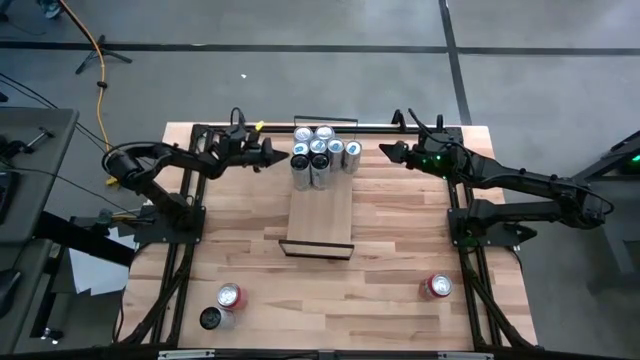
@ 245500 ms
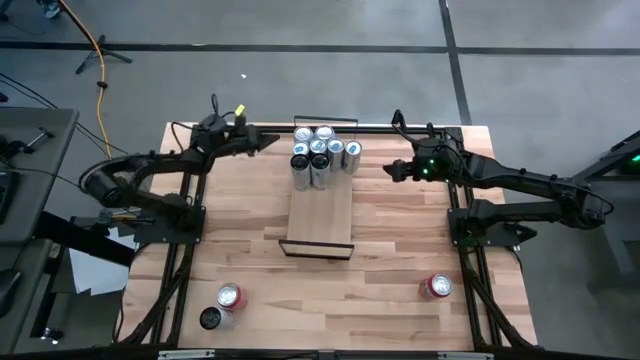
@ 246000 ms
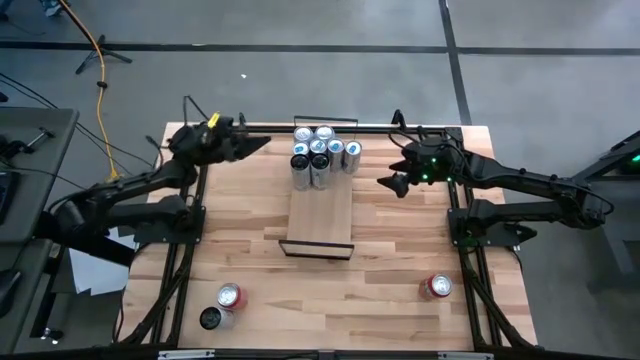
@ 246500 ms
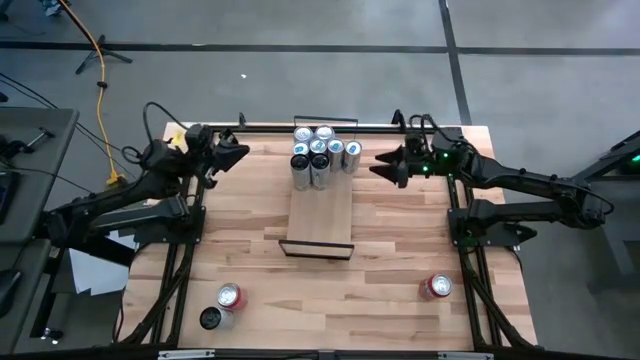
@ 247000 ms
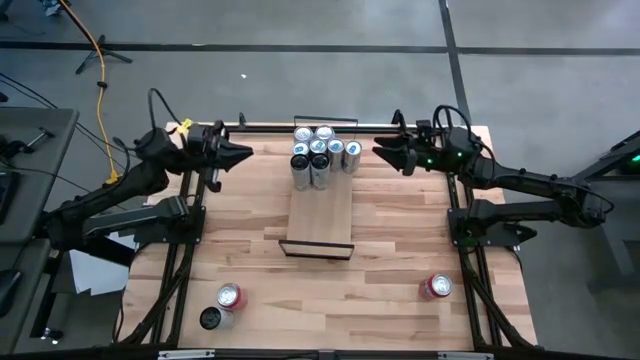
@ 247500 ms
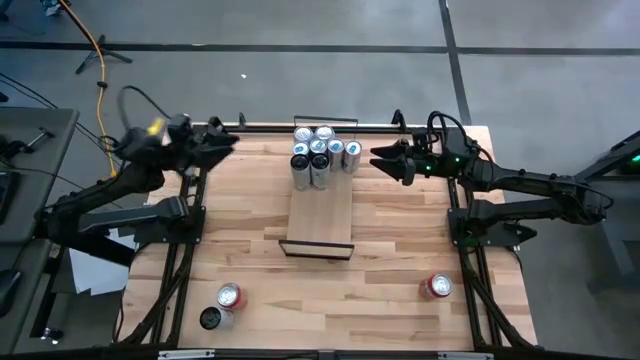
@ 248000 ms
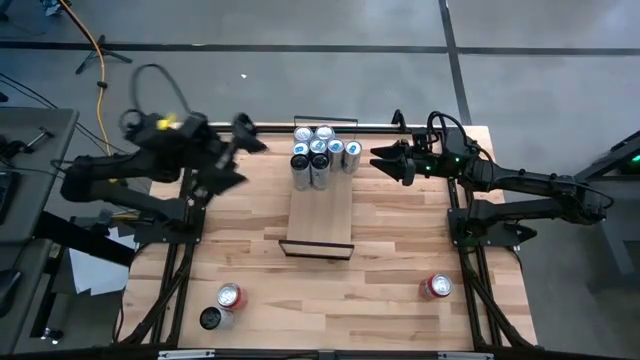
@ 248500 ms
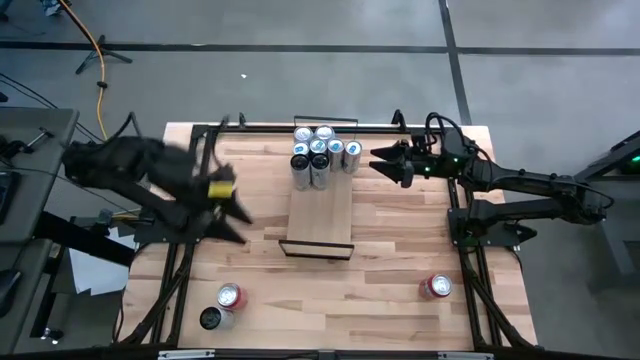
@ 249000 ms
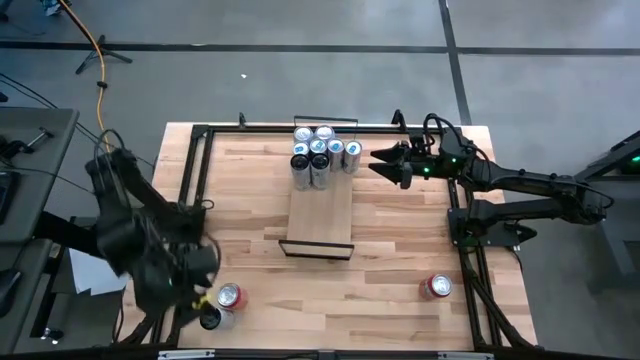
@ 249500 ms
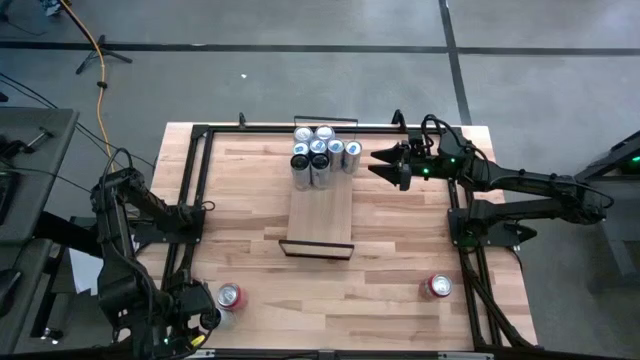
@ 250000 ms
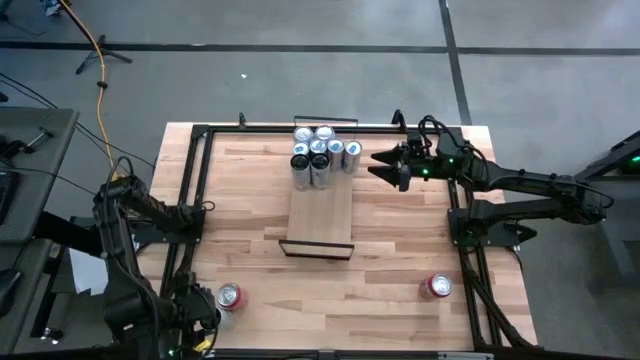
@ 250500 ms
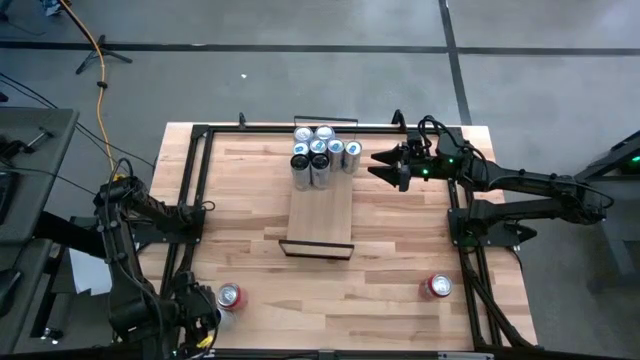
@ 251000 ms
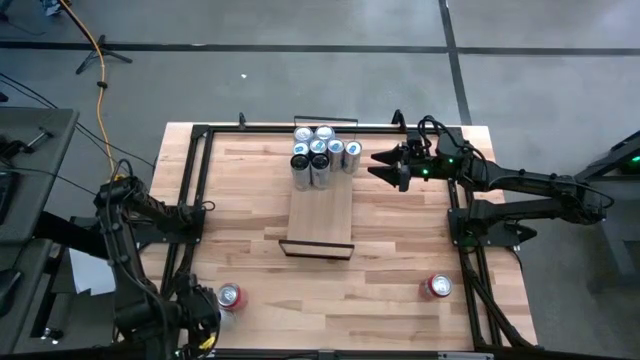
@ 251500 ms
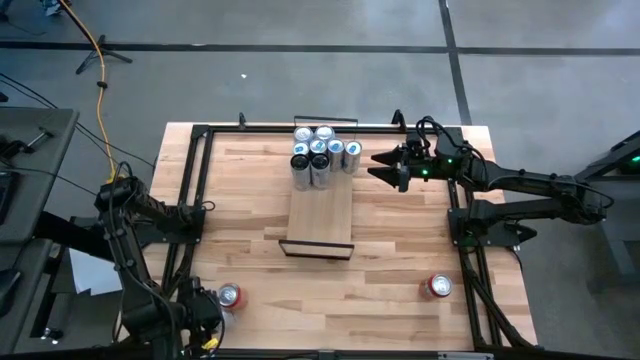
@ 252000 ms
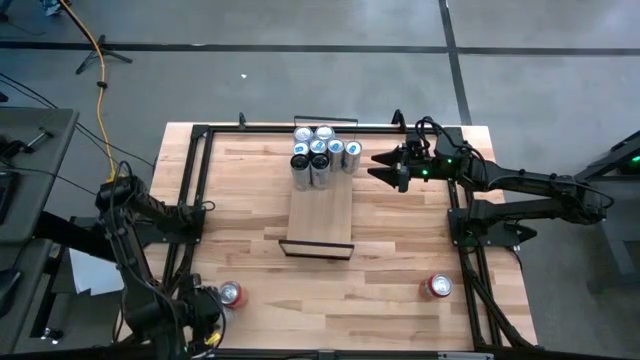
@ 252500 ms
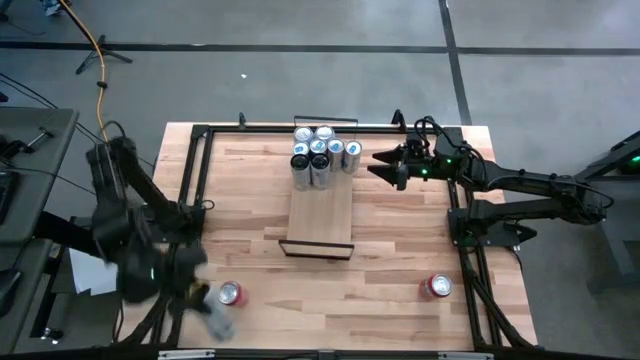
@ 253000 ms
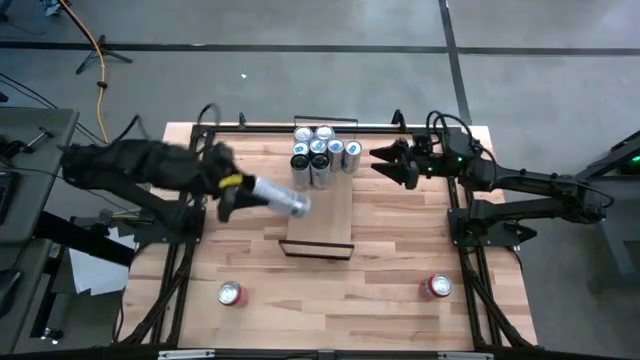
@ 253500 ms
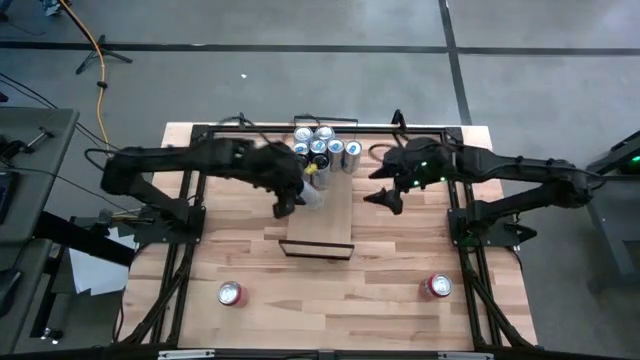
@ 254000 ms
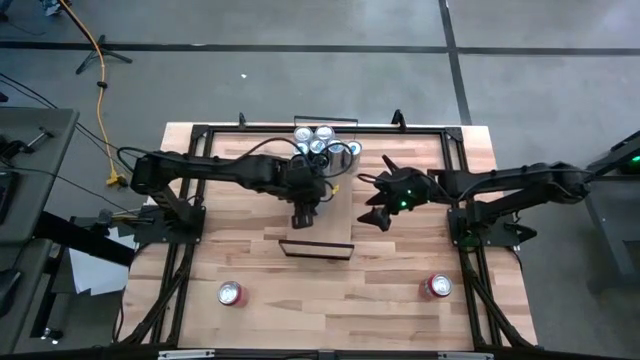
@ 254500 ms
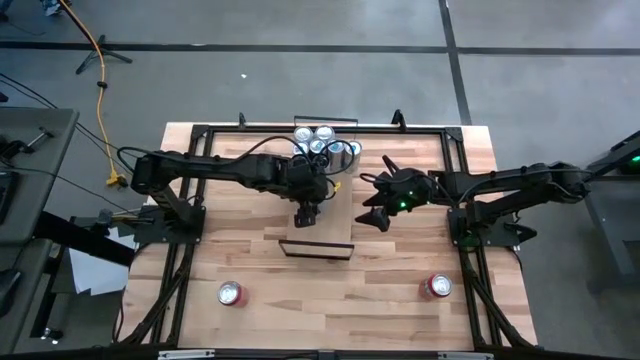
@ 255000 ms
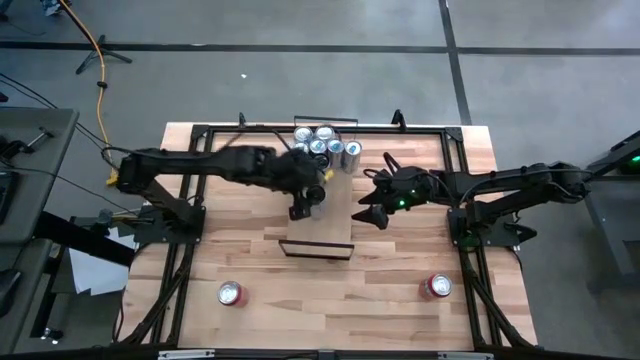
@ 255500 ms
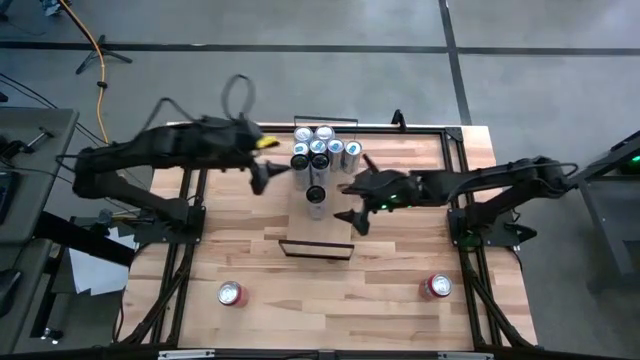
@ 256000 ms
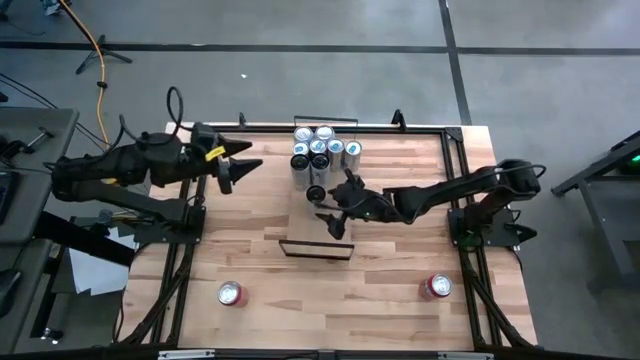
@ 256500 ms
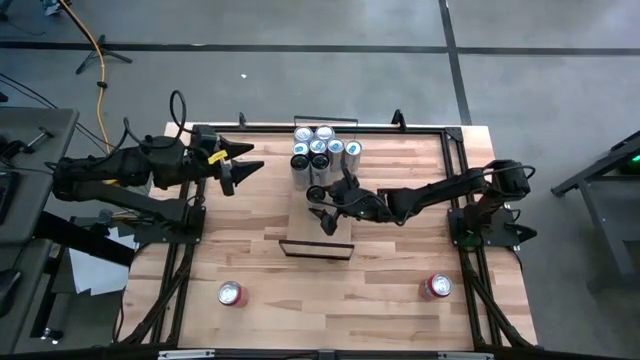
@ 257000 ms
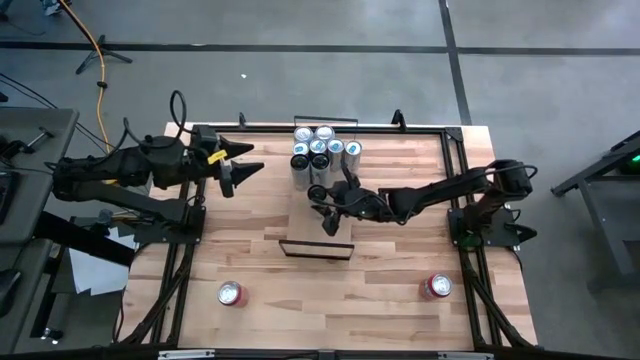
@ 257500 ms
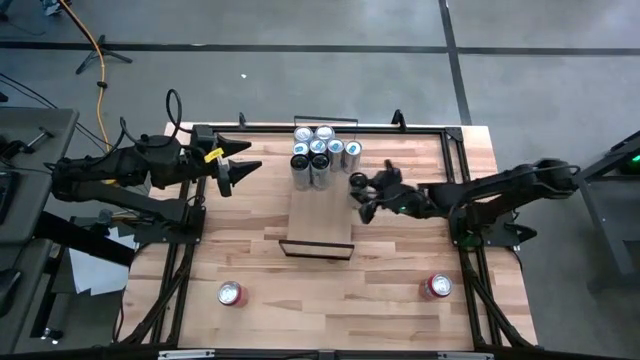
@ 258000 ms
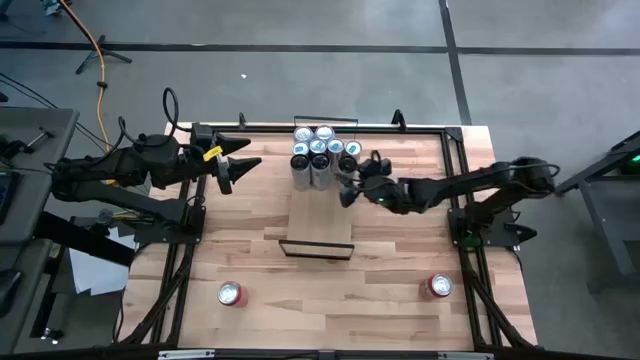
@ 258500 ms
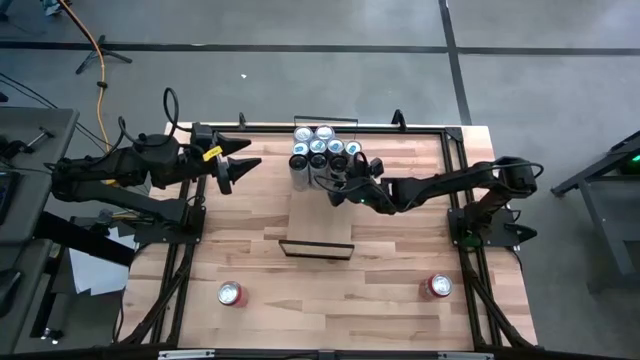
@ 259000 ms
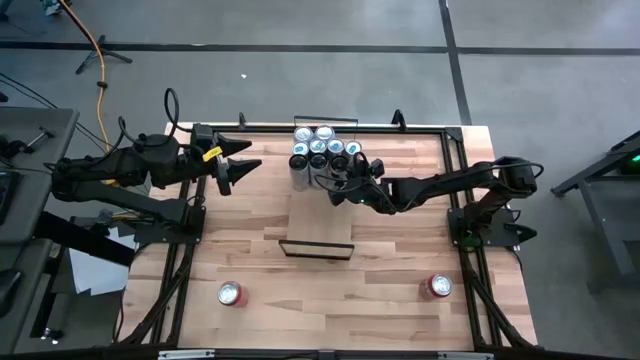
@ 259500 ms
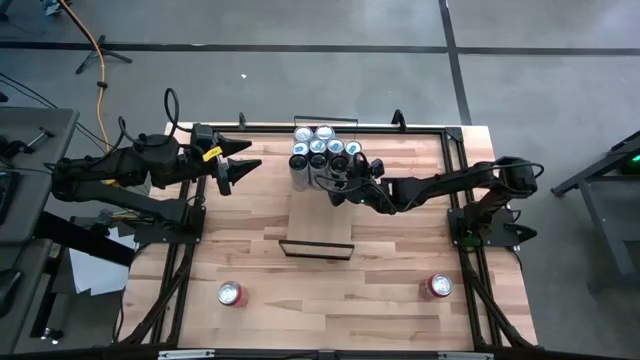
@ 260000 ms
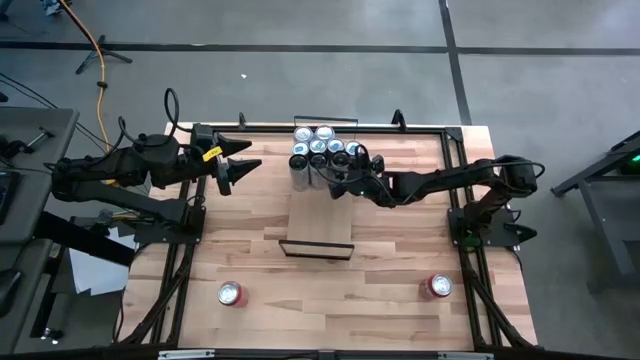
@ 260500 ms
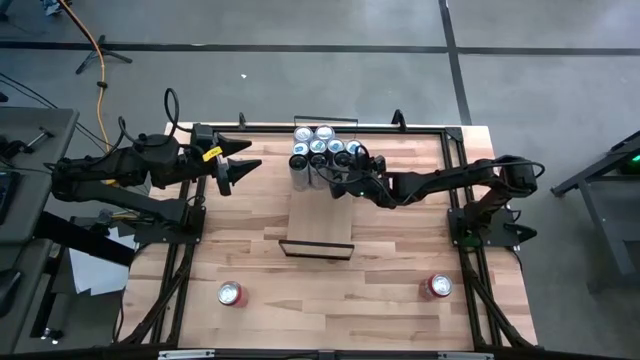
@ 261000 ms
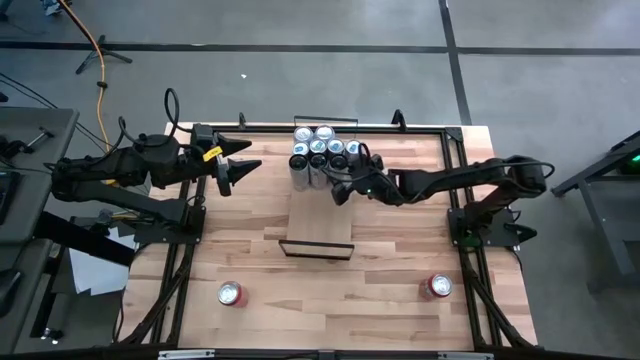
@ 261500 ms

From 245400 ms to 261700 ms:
Task: Place canned beverage on shelf
Put the white pink soda can on the shelf aligned with the other white pink soda can

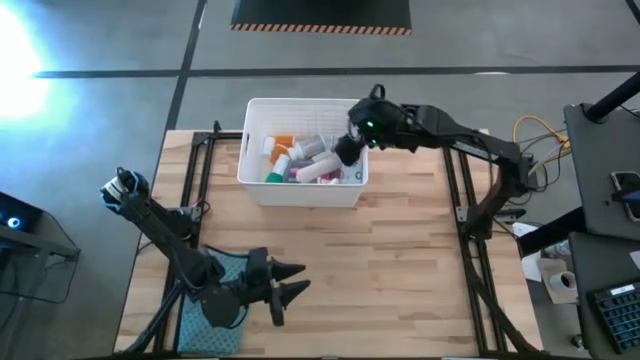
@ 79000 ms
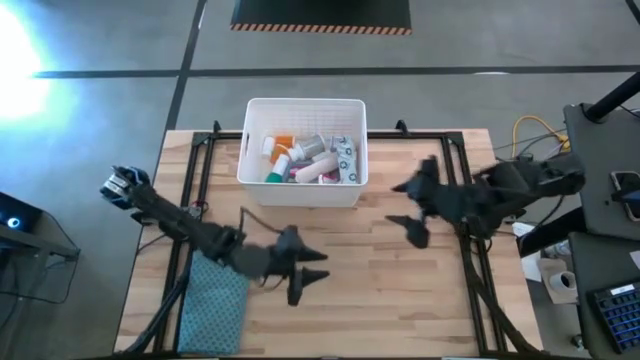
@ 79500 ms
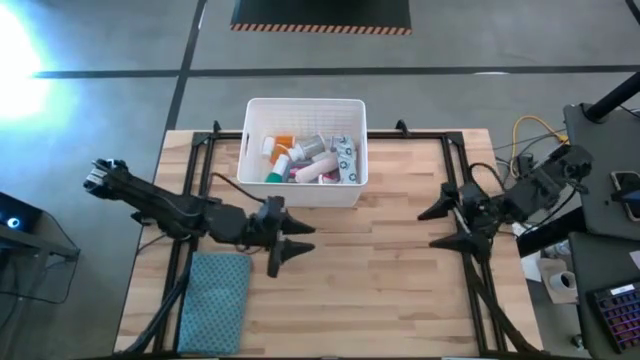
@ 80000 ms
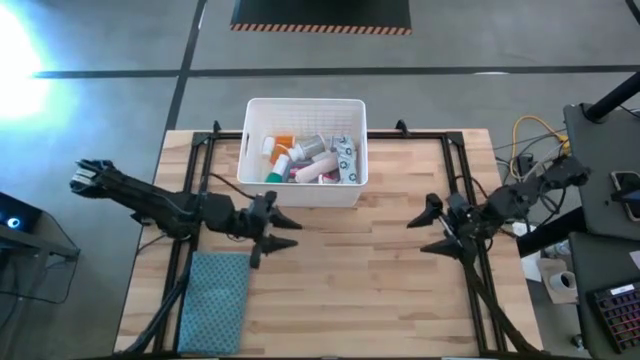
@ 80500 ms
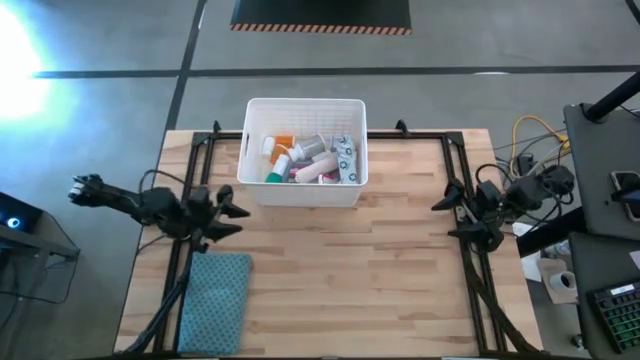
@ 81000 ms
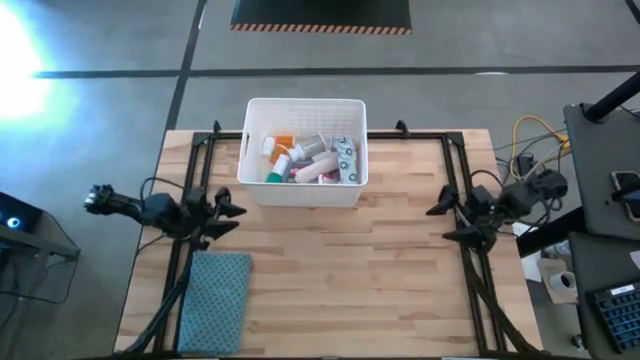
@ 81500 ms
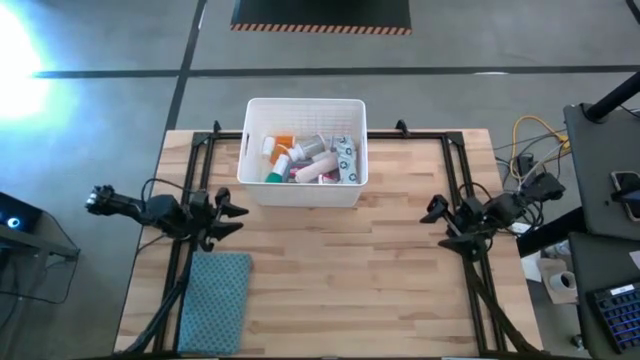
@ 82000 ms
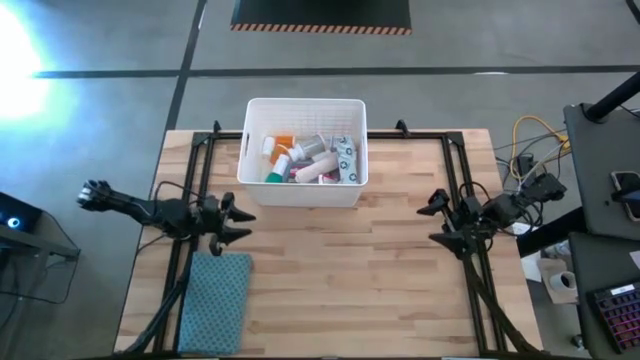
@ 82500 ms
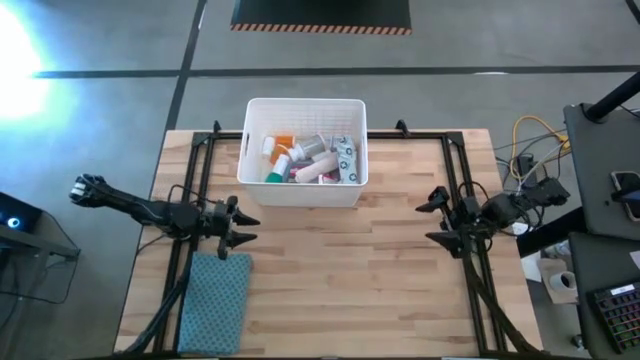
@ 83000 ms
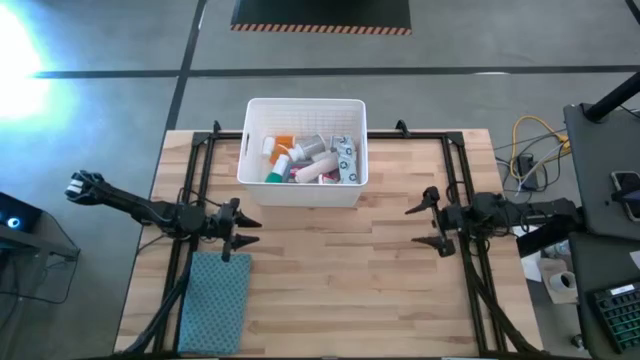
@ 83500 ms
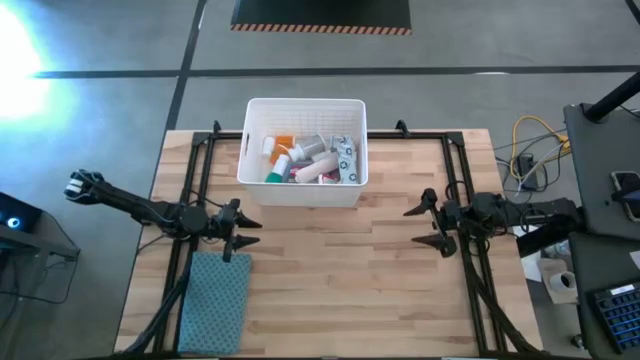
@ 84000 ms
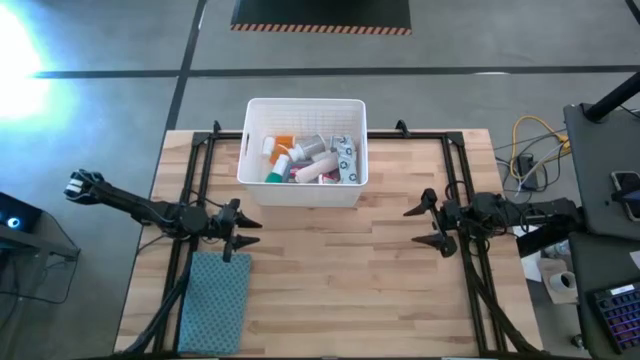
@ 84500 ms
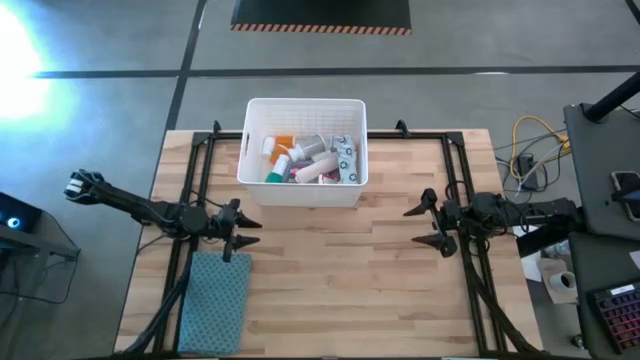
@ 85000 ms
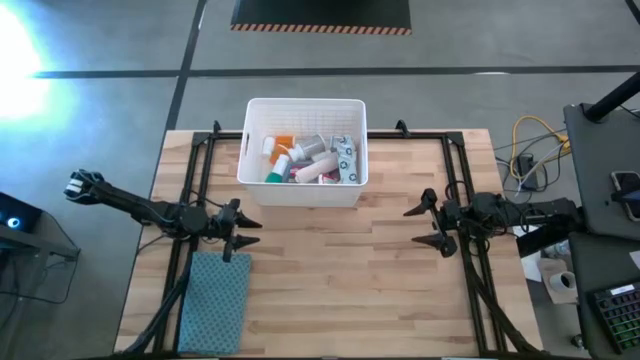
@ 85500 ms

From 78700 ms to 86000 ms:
Task: Pick & place medical supplies in basket/bin
Return to Home Position
